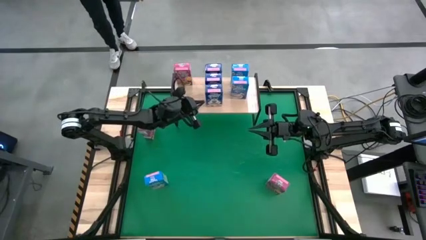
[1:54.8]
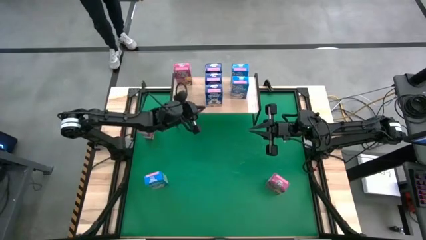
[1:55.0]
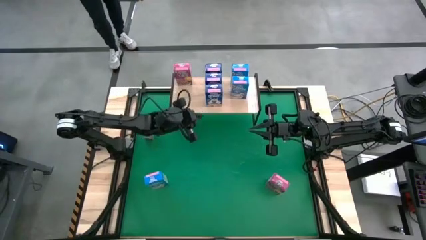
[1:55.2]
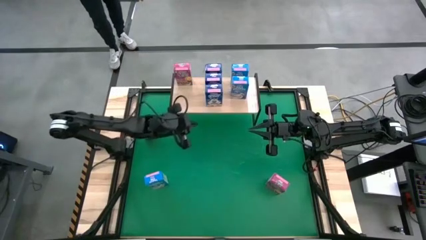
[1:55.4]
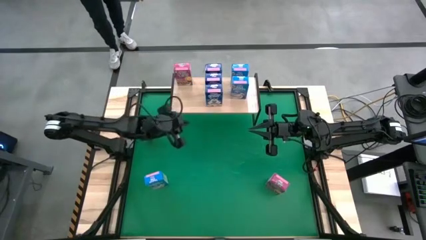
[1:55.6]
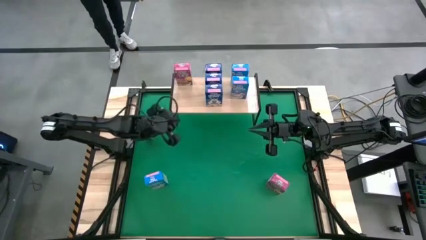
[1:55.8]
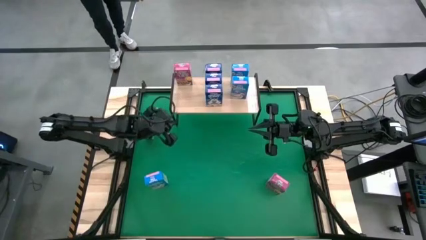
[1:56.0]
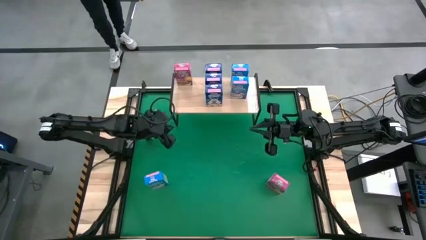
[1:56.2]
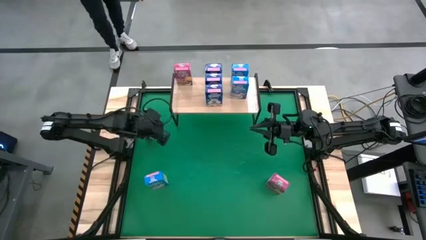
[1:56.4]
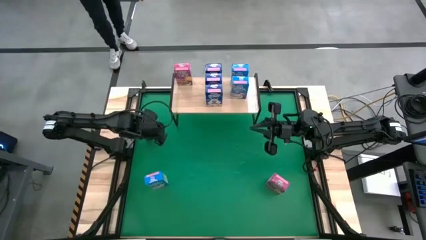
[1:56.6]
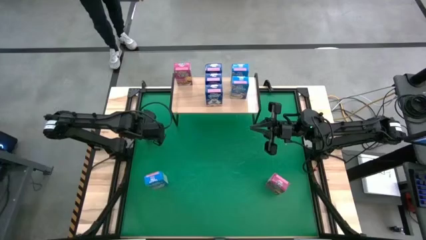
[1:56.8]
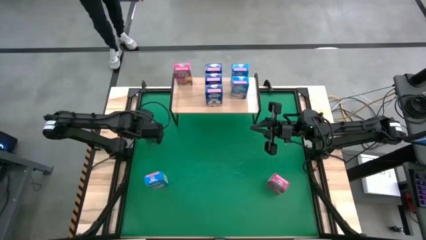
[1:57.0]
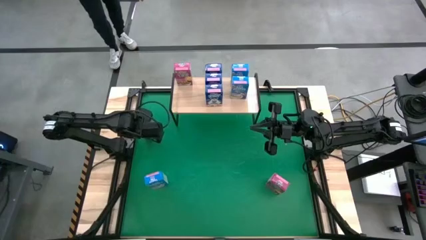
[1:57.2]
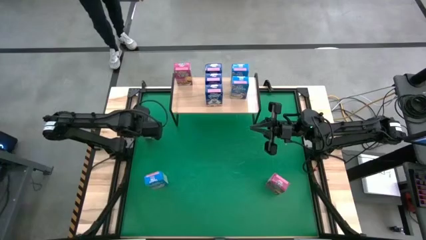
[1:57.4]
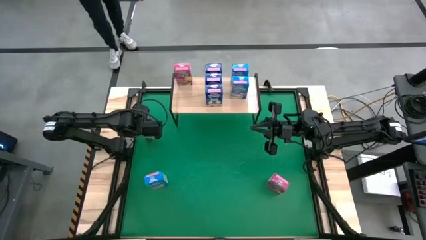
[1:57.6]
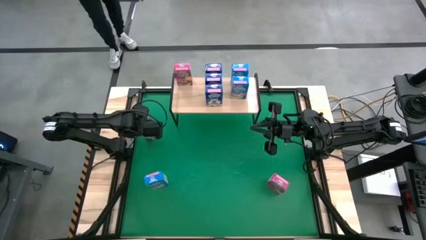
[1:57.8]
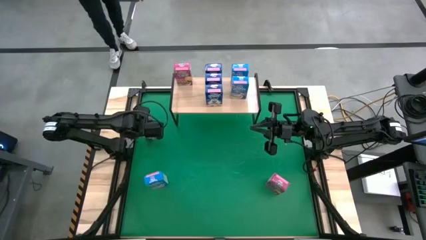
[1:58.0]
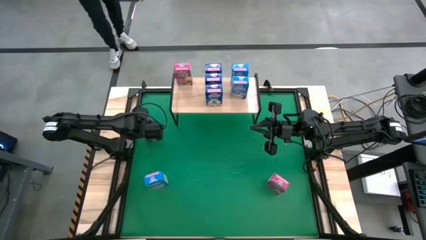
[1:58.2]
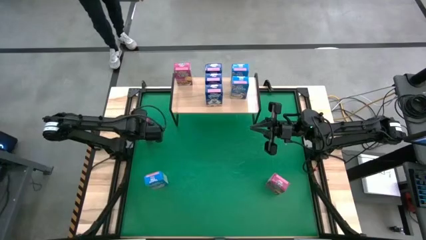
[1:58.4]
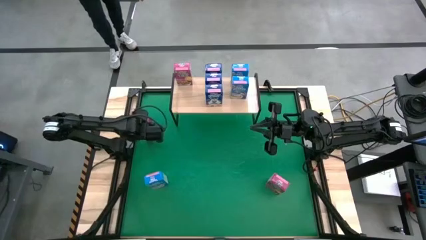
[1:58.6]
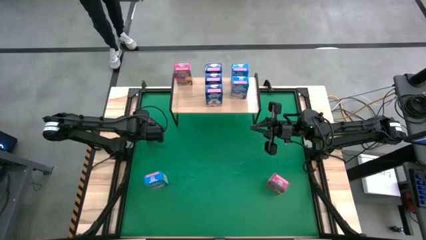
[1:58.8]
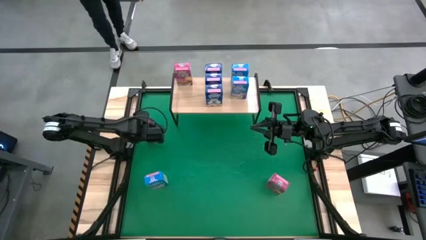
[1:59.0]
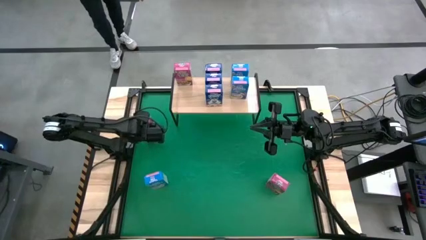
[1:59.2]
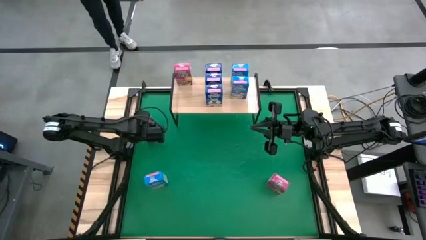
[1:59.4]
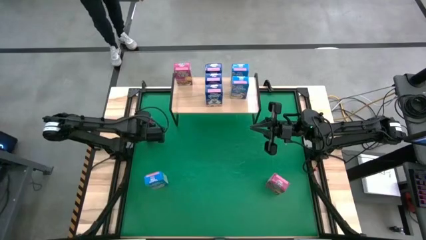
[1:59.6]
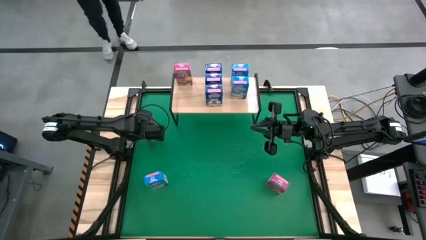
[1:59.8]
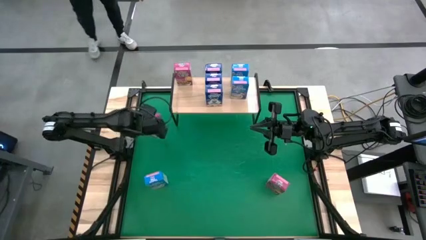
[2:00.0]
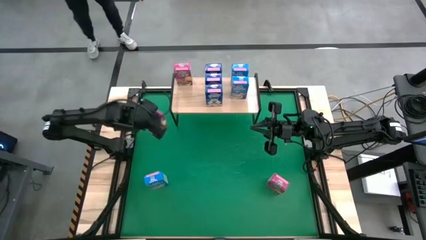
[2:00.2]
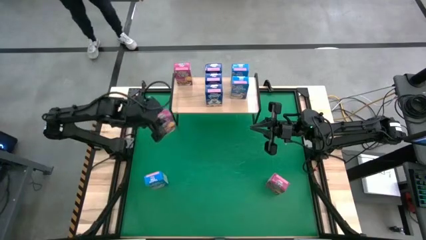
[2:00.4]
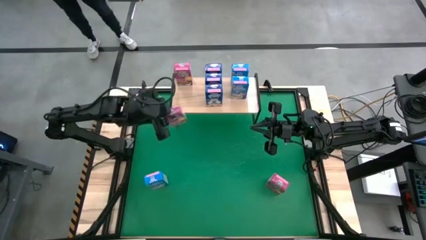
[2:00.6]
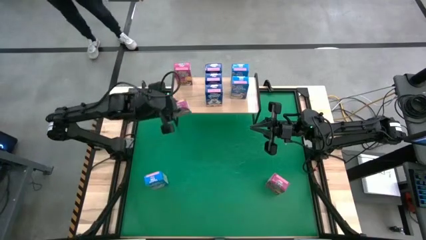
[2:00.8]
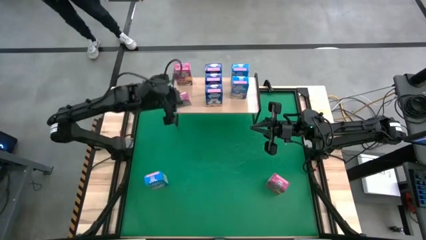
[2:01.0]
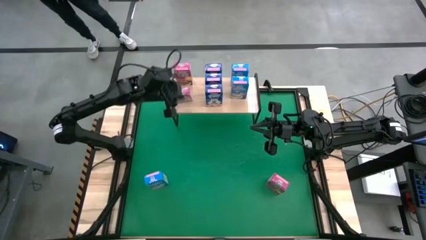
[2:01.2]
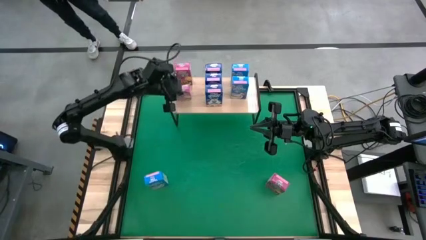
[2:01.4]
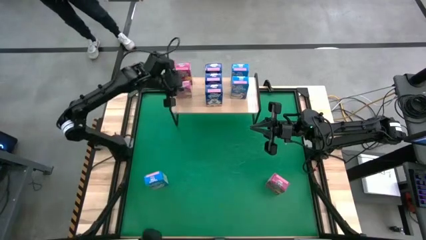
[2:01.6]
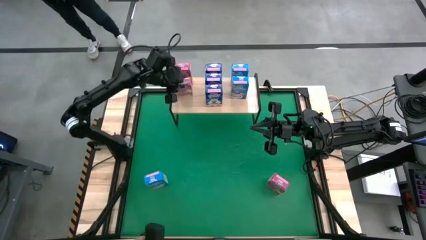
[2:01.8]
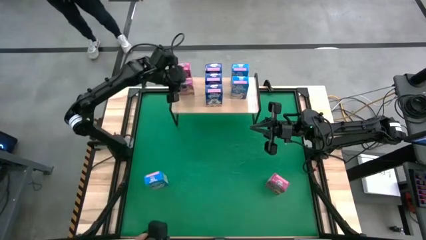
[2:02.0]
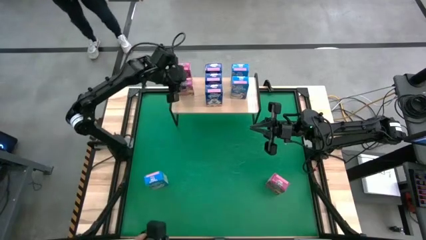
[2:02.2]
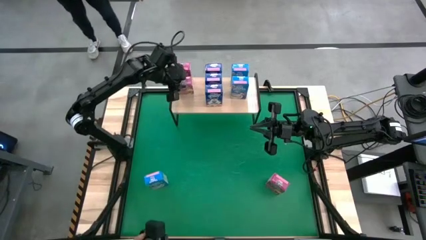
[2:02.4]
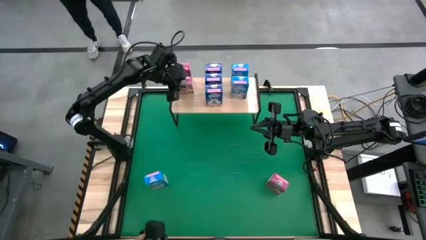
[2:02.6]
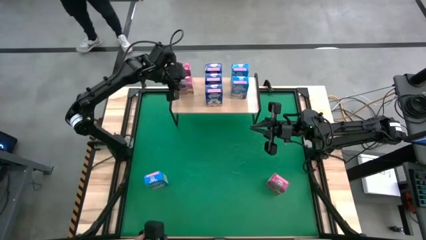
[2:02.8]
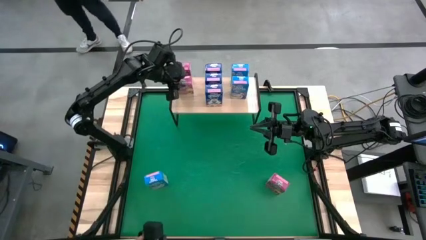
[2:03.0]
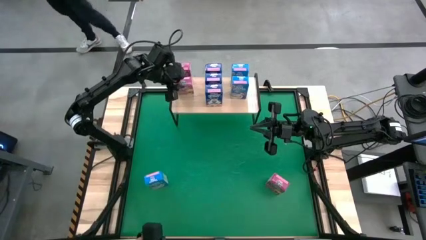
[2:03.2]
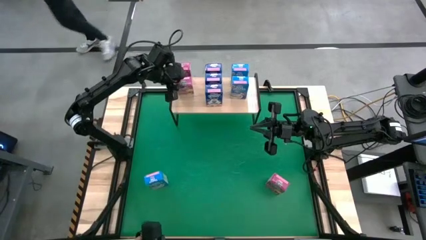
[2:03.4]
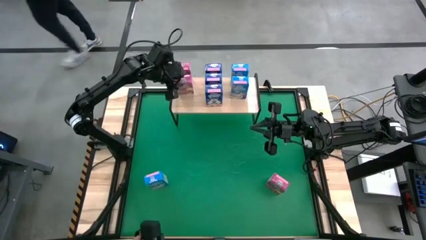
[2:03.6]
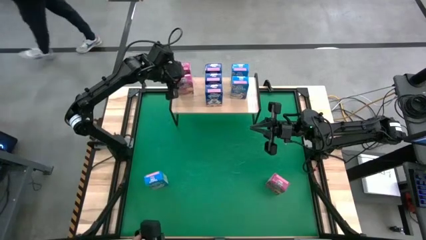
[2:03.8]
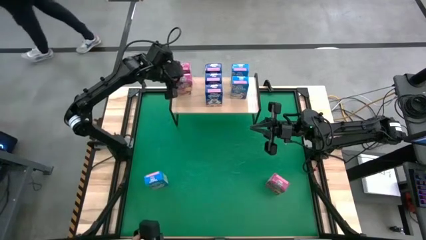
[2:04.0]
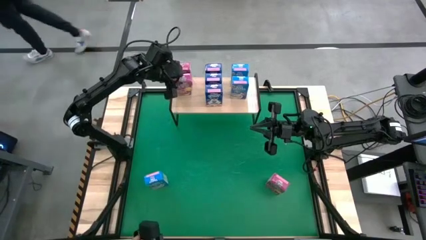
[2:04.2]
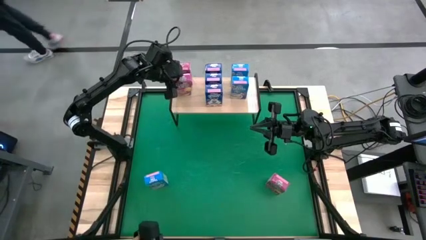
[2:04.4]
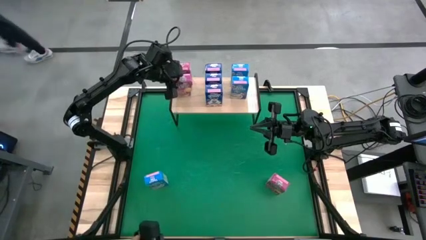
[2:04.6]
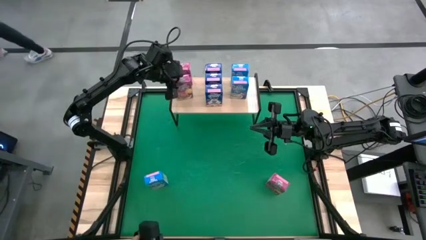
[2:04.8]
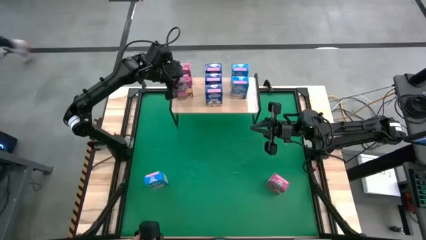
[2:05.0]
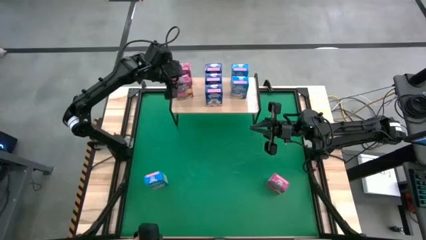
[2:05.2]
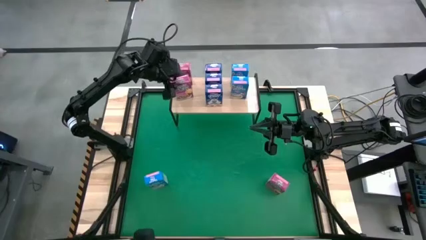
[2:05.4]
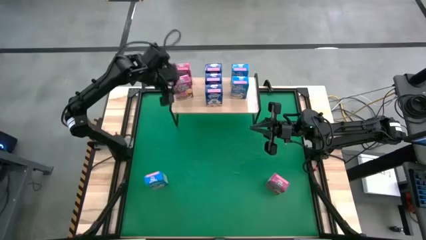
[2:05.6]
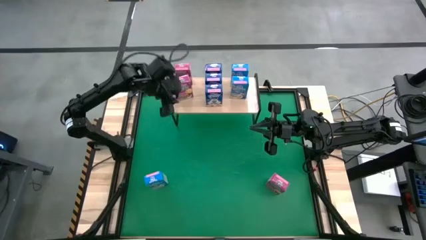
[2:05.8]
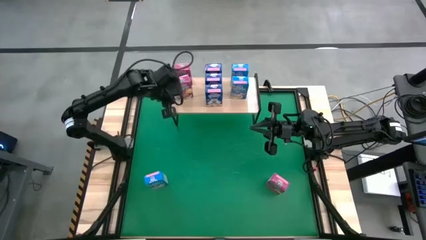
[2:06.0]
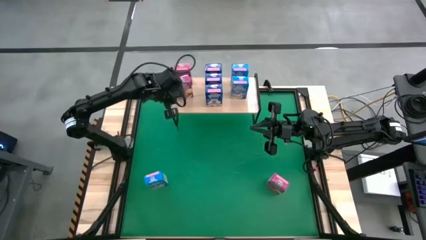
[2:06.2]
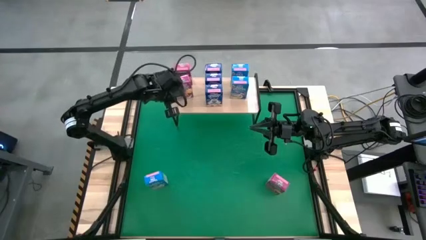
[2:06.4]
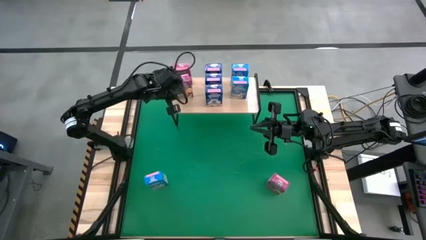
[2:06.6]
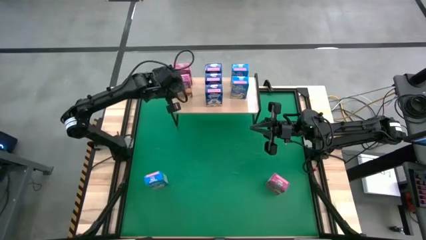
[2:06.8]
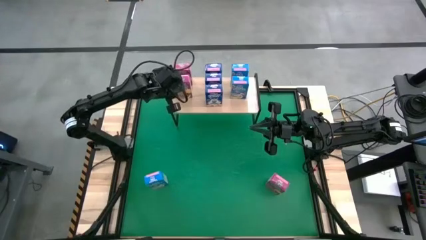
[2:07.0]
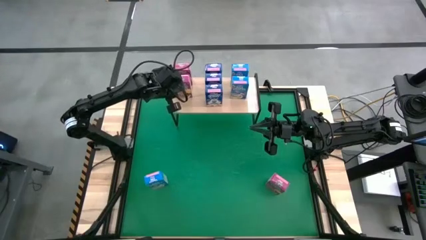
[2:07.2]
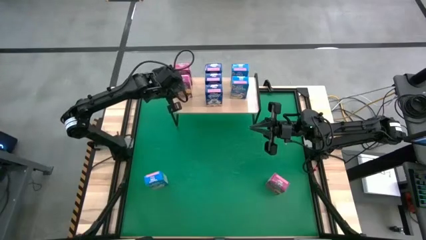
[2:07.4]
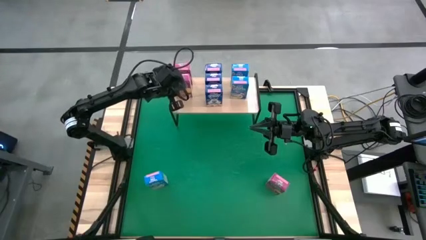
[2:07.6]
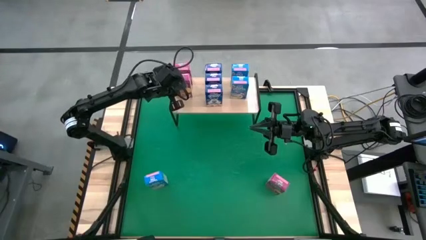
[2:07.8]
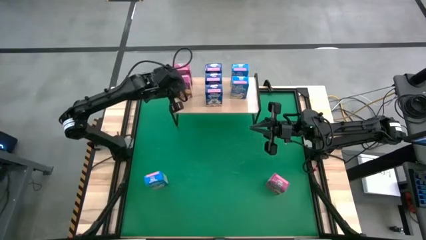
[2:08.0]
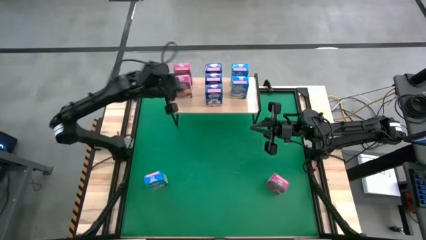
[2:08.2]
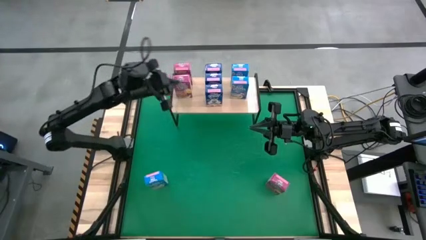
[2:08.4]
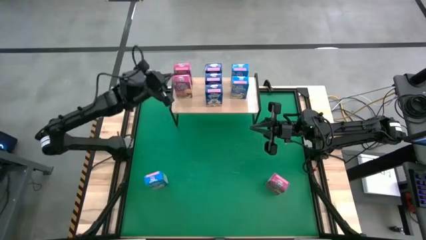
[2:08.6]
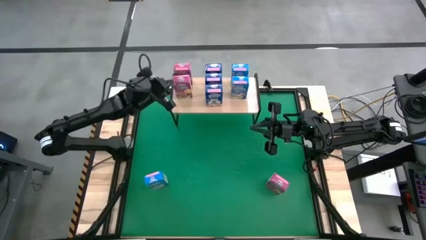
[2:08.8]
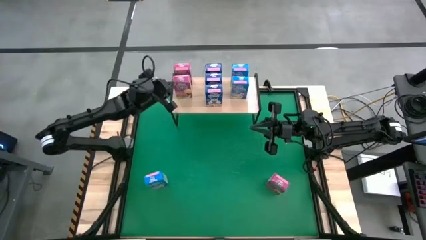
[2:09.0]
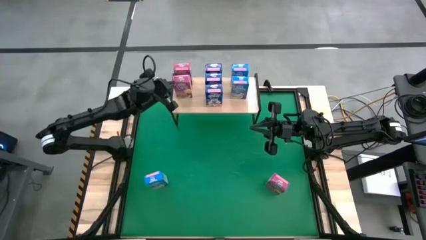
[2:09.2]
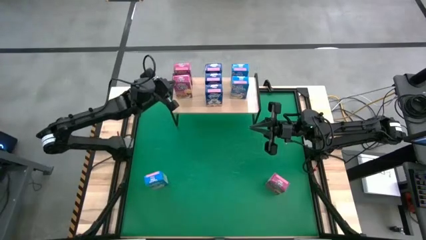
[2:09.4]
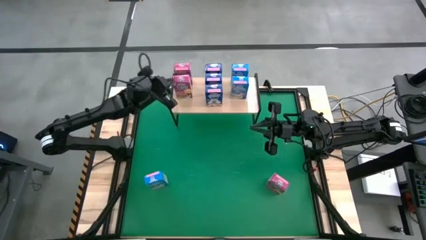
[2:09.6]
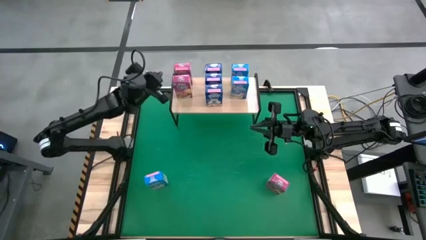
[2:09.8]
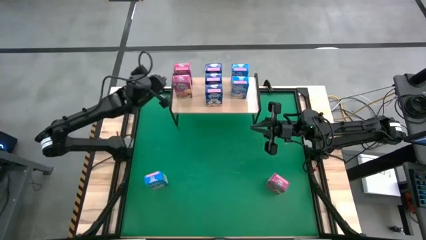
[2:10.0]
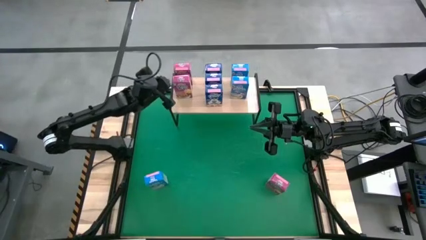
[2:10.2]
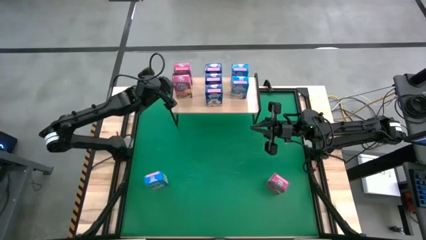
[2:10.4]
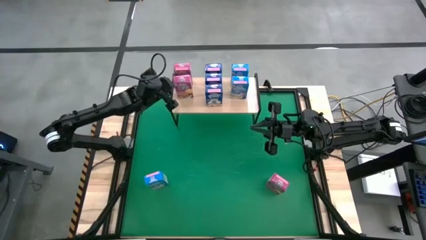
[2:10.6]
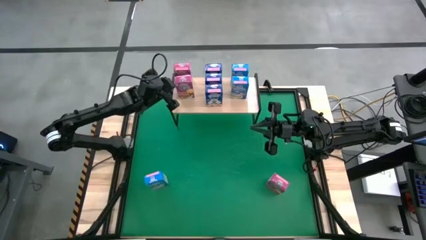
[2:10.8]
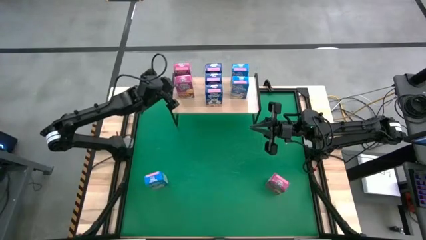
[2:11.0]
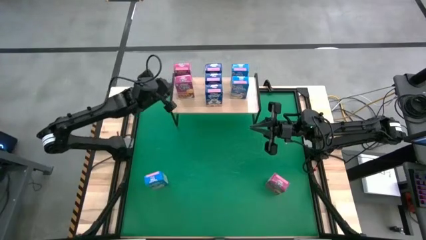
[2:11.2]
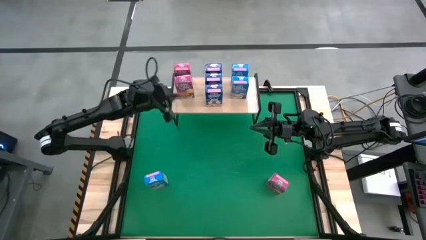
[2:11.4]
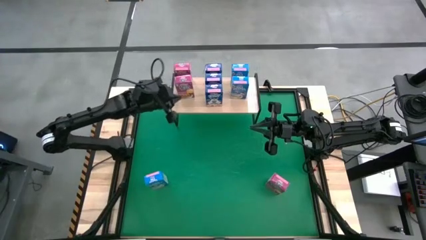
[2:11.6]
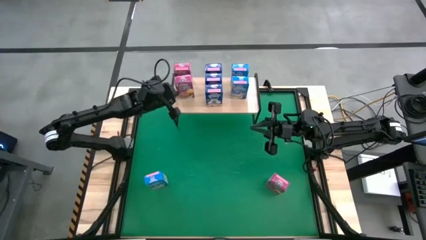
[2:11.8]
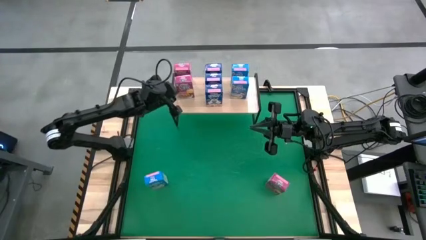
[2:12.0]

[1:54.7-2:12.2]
Task: Stack cereal on shelf
Put the top violet cereal box on the shelf aligned with the other violet cereal box
